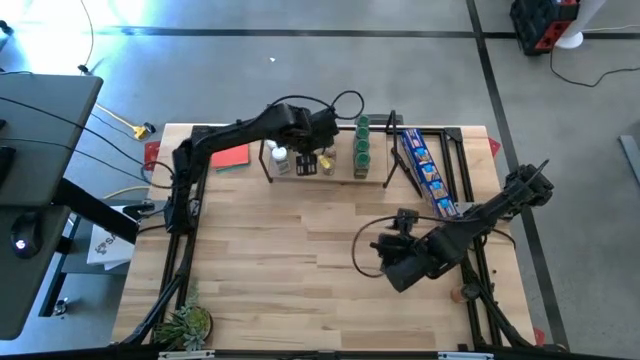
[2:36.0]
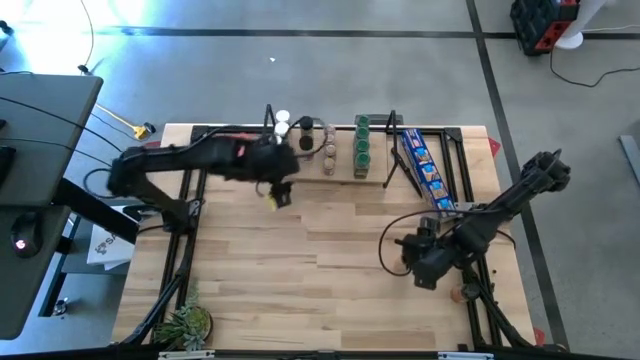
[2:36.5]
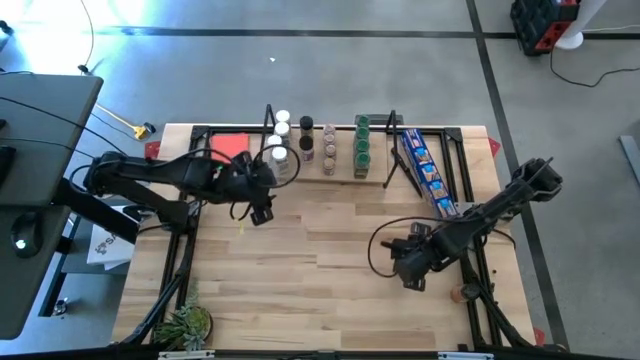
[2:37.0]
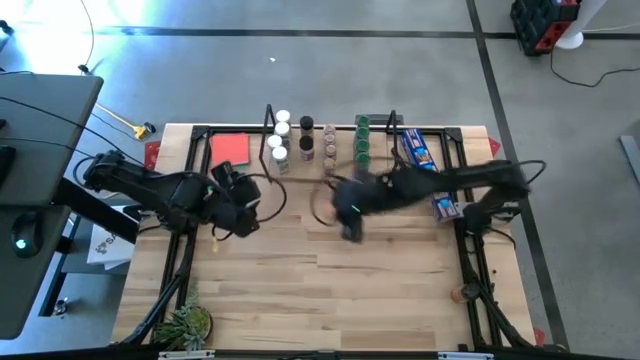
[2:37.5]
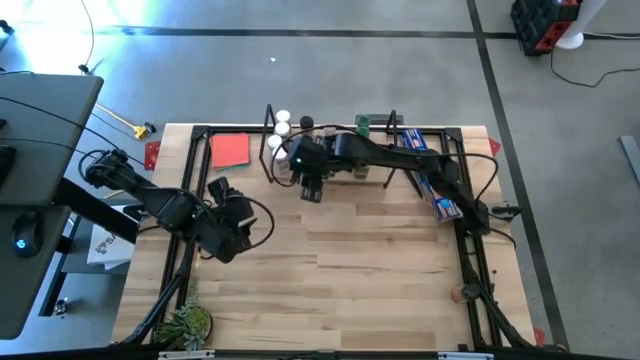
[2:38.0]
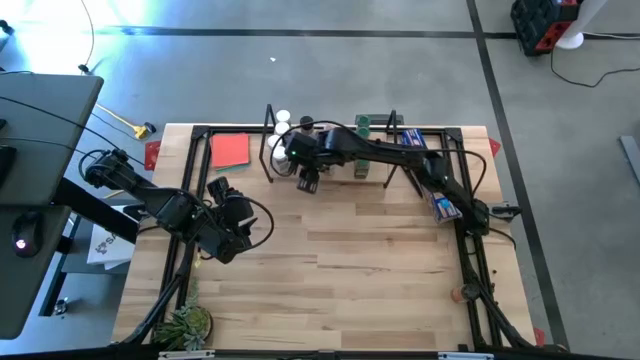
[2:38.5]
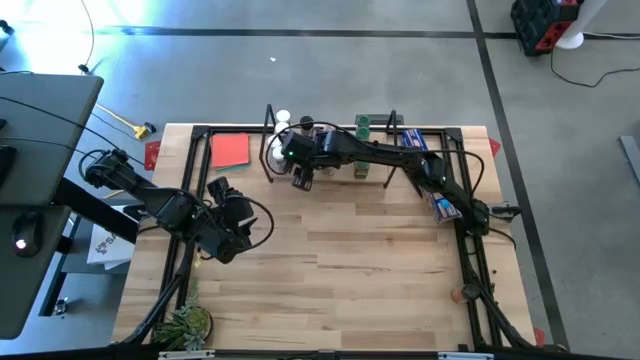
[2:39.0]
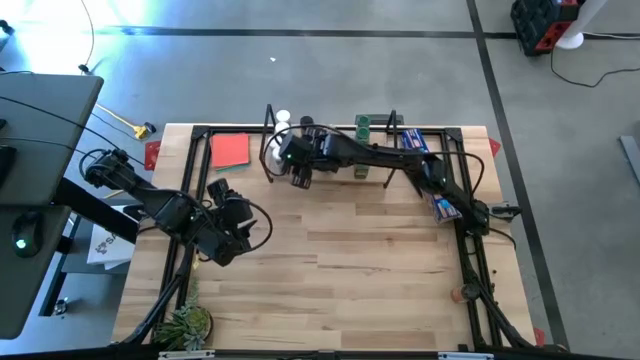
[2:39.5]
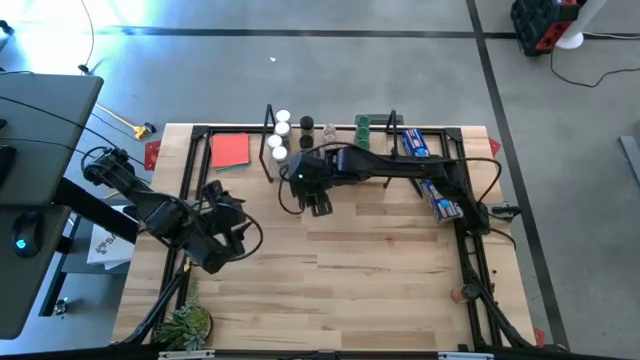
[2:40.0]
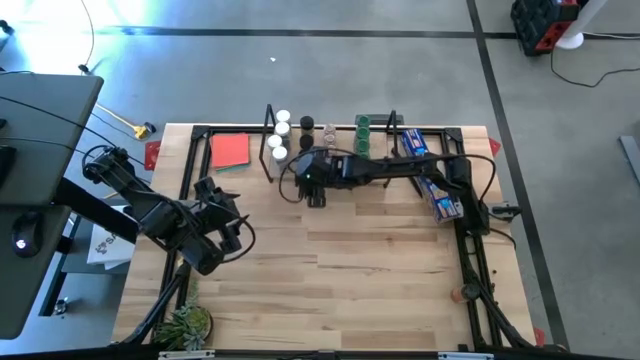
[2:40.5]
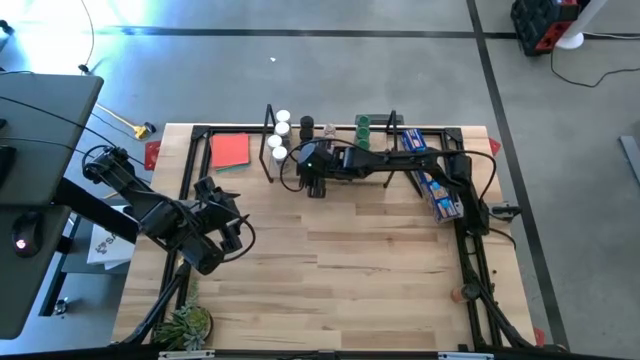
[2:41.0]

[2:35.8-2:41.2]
Task: Shelf spices
Put the black seasoning bottle on the shelf aligned with the other black seasoning bottle

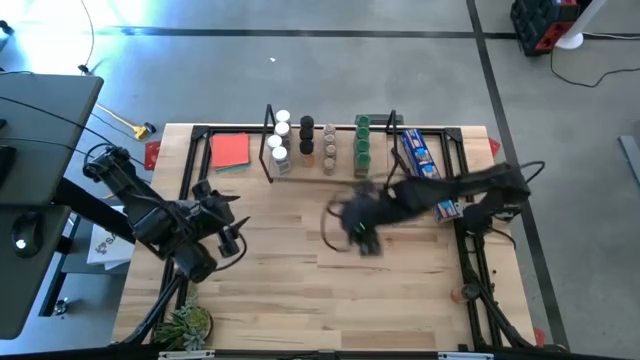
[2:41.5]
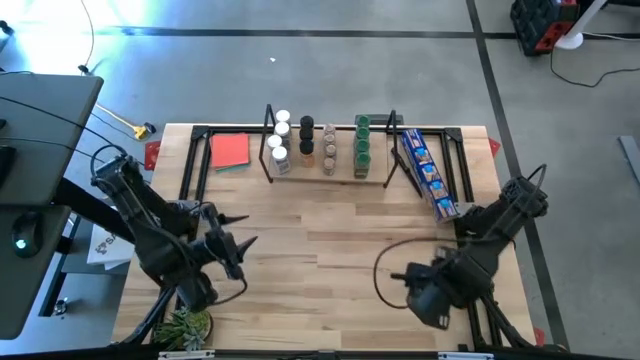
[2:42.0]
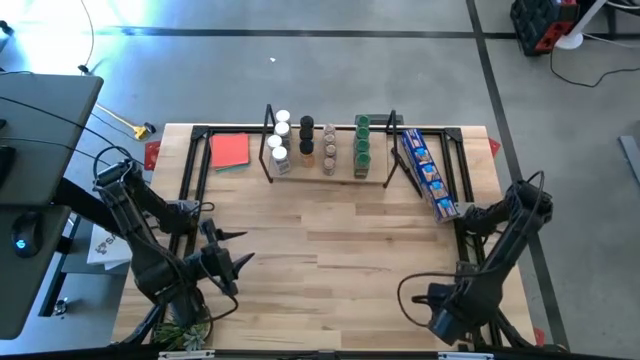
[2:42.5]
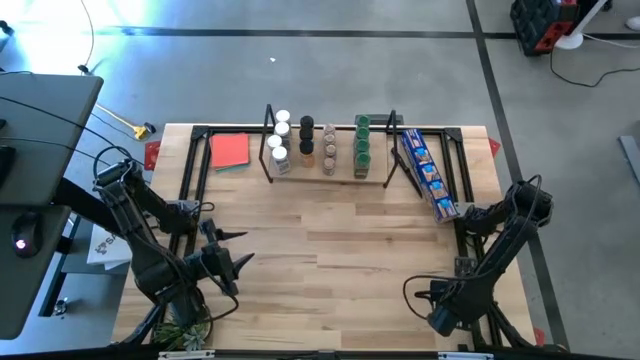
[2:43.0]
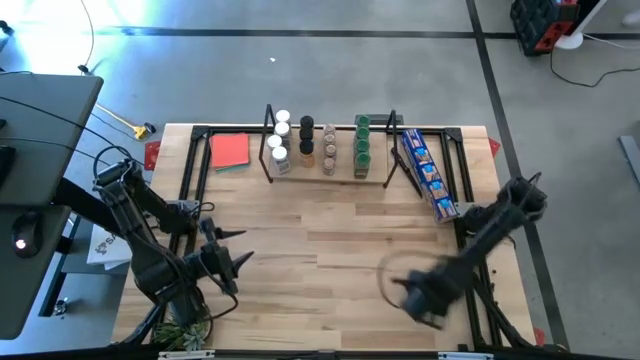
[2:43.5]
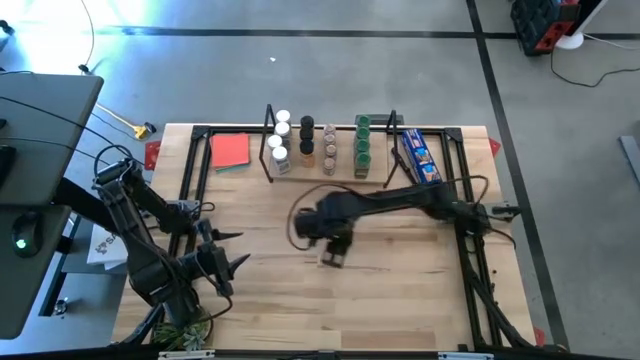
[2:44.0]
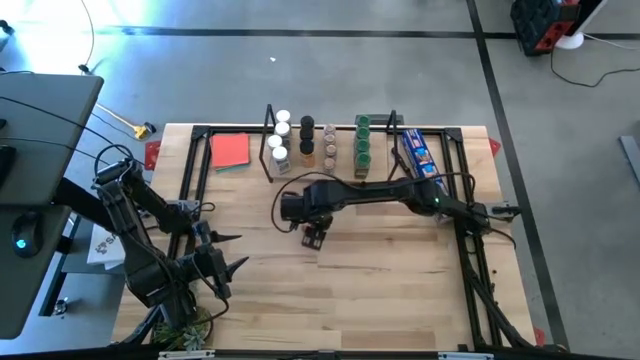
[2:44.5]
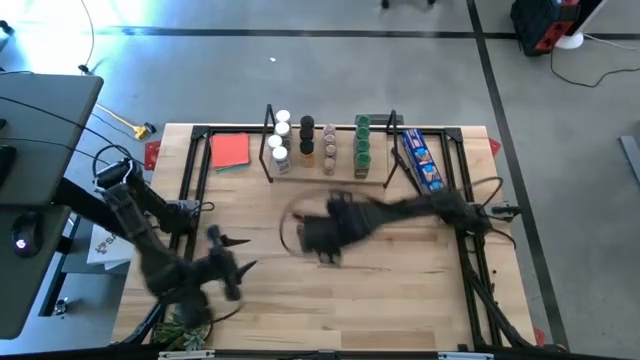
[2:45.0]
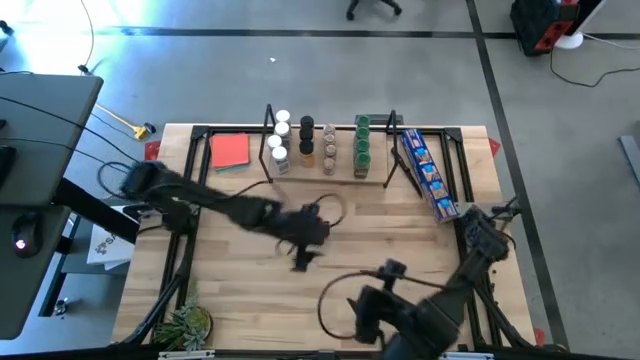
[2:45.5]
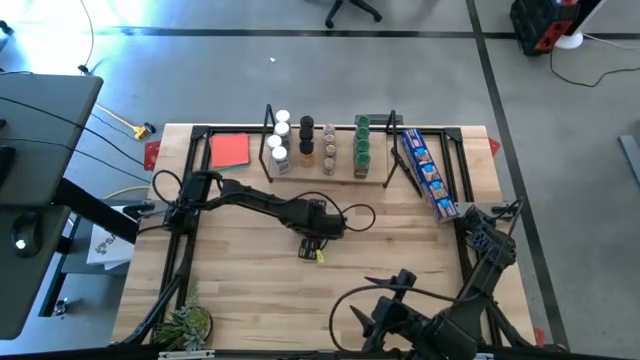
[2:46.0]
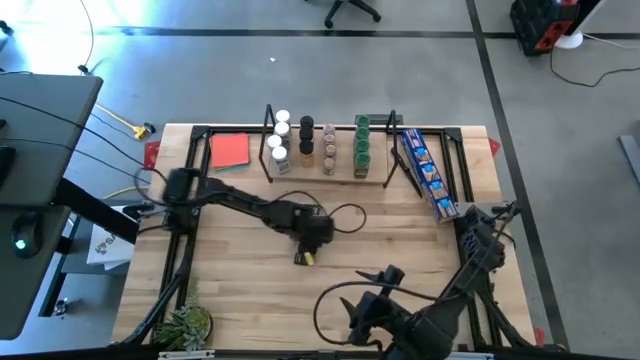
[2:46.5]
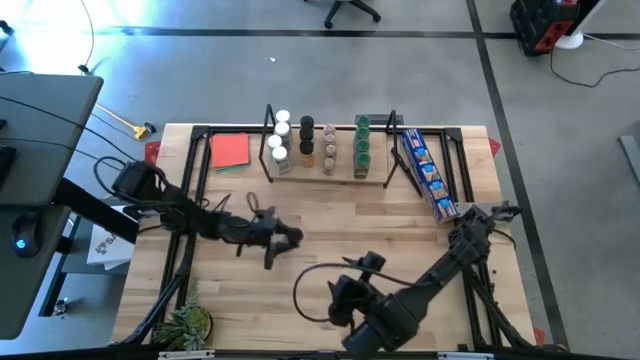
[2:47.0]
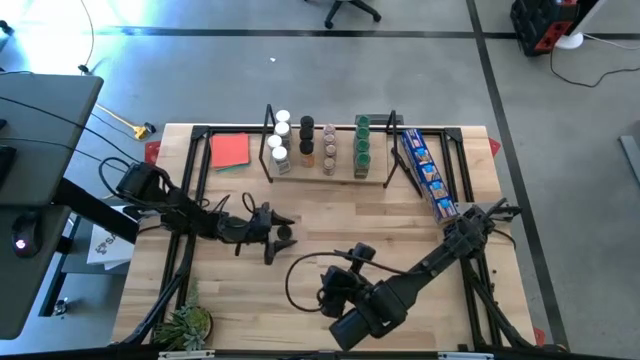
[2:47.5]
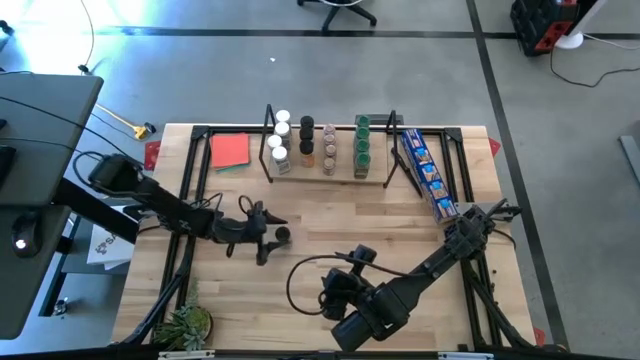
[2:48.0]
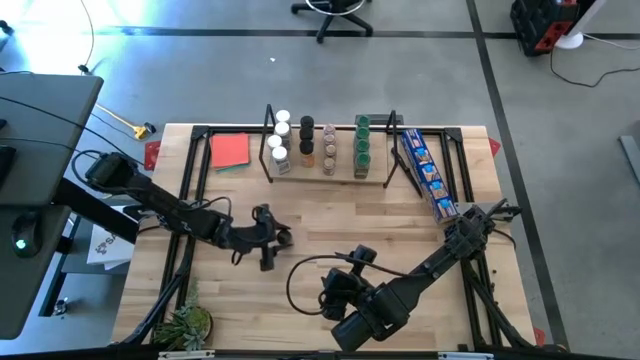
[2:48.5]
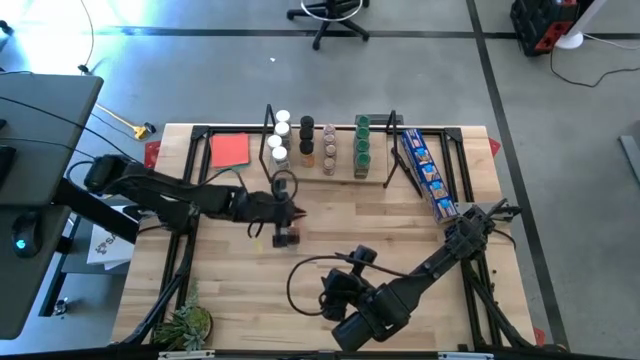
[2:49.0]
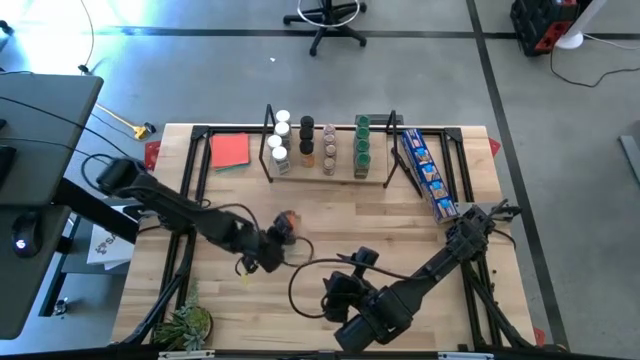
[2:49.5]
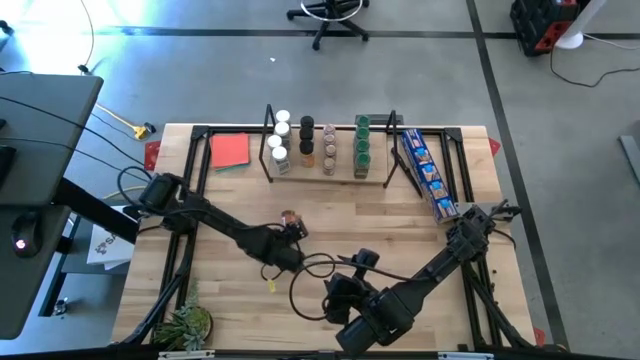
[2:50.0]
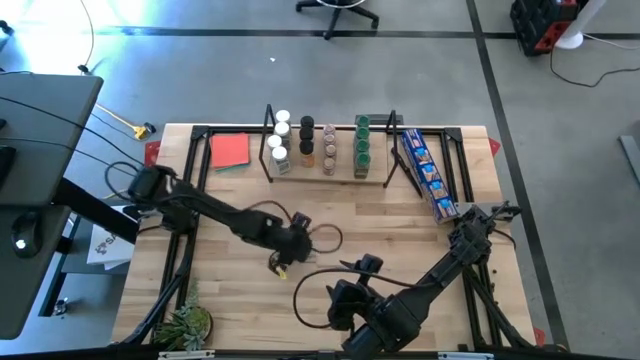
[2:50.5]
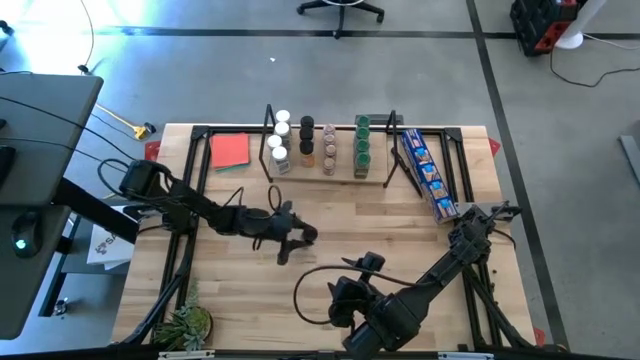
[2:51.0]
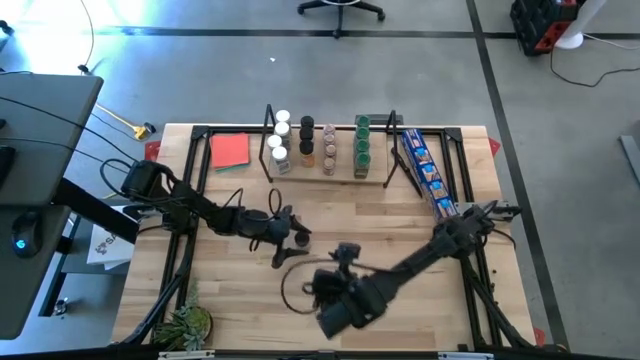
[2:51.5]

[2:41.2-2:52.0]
Put the black seasoning bottle on the shelf aligned with the other black seasoning bottle

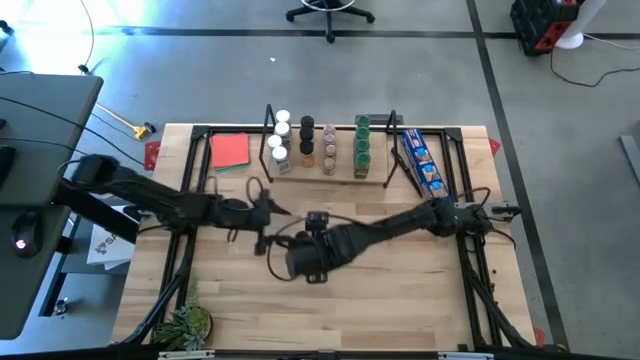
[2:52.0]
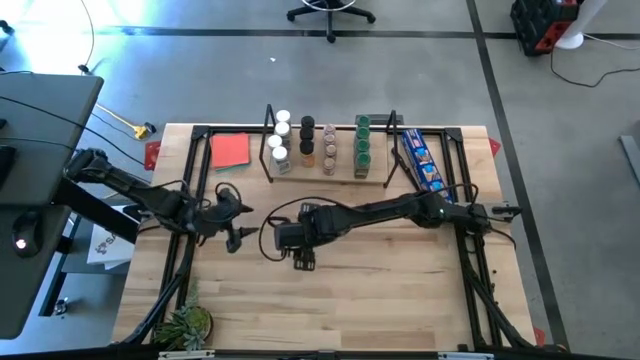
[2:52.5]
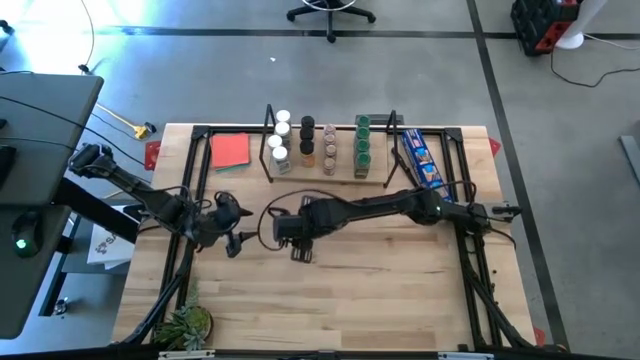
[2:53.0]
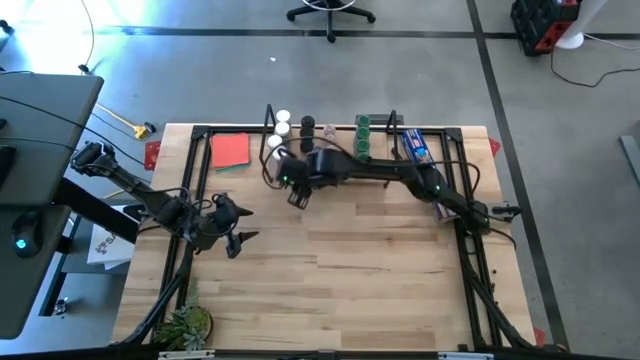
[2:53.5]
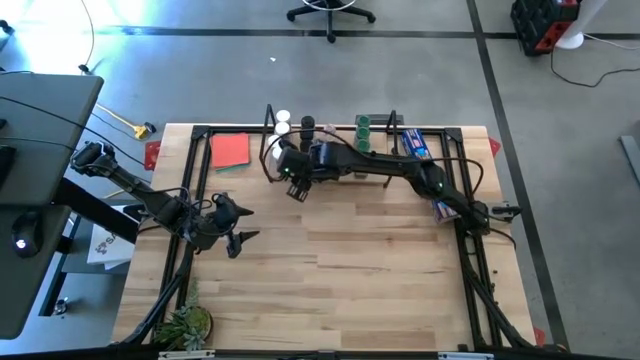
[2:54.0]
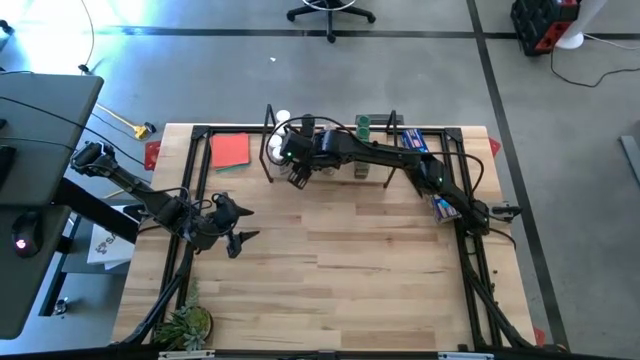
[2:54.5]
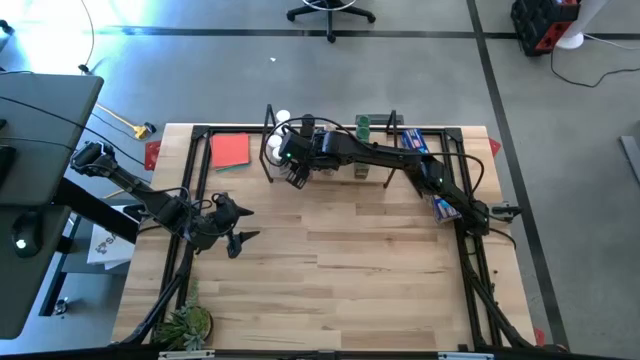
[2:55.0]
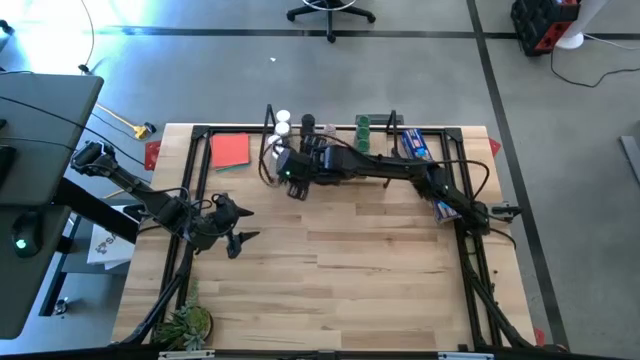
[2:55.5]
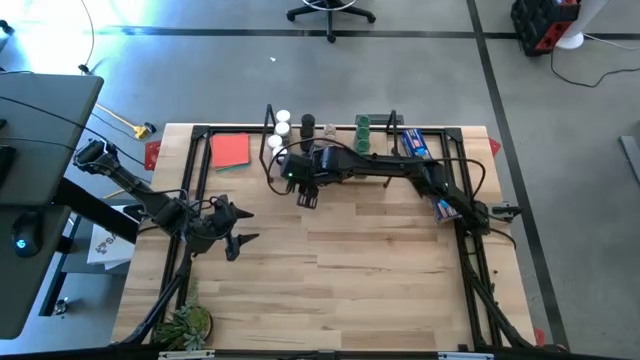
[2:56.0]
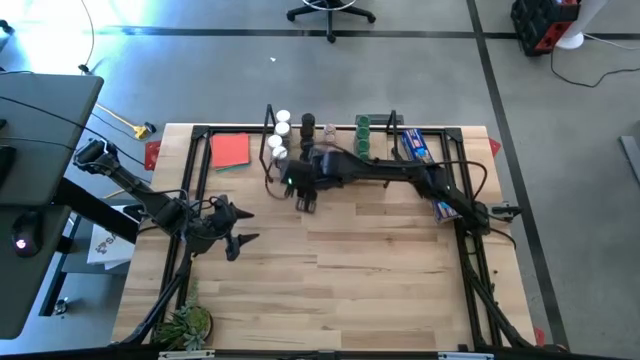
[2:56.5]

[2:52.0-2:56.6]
Put the black seasoning bottle on the shelf aligned with the other black seasoning bottle
